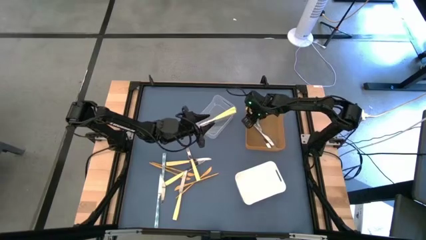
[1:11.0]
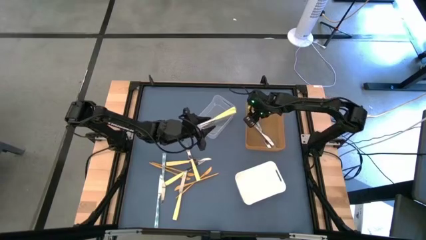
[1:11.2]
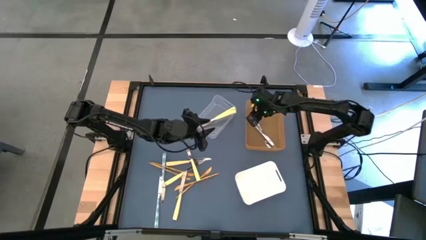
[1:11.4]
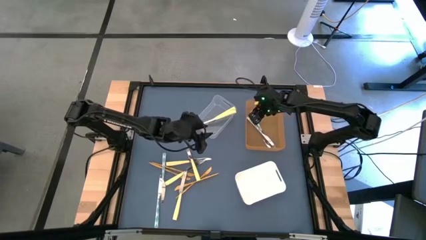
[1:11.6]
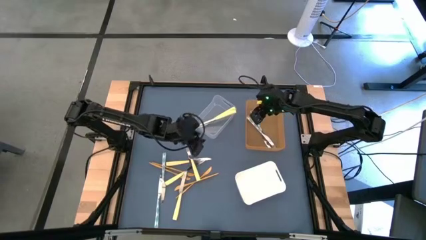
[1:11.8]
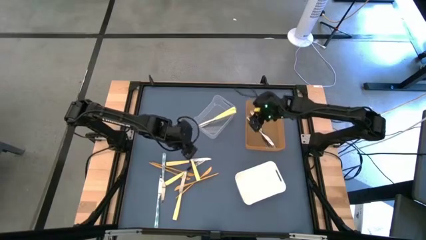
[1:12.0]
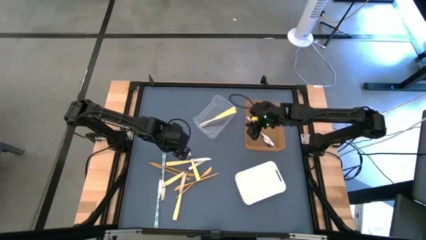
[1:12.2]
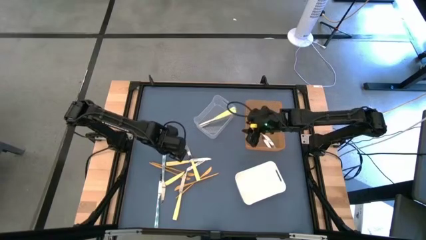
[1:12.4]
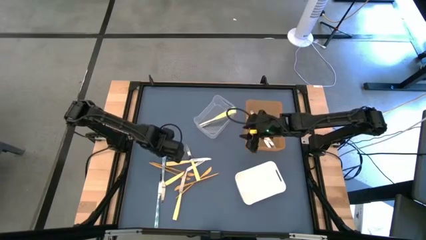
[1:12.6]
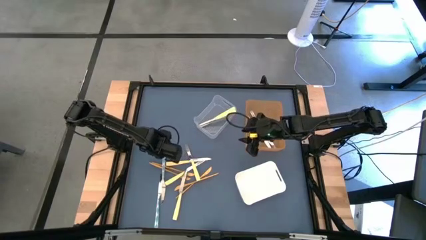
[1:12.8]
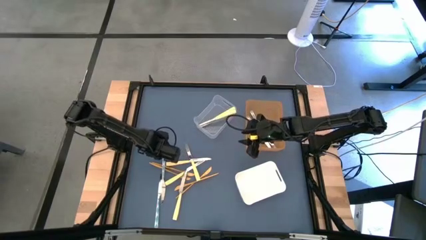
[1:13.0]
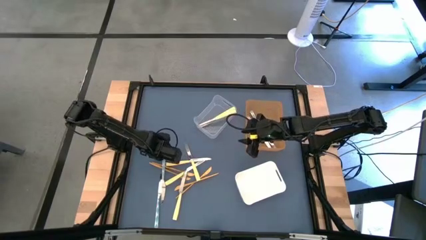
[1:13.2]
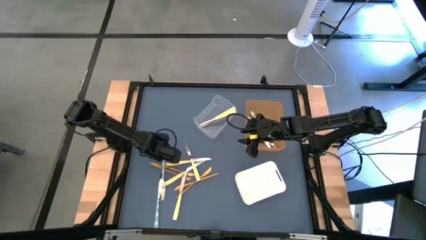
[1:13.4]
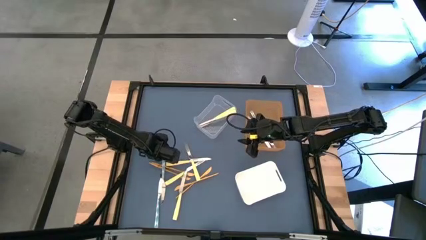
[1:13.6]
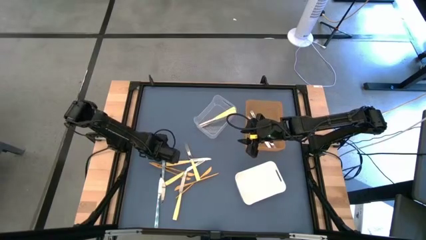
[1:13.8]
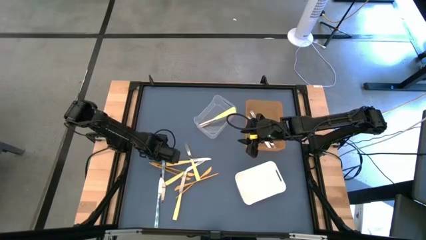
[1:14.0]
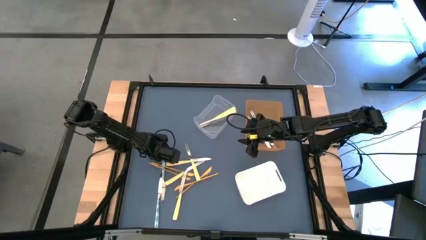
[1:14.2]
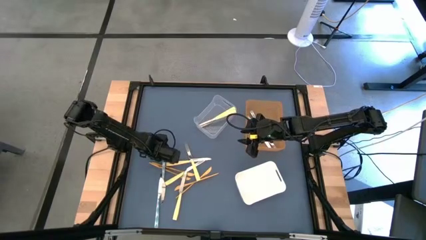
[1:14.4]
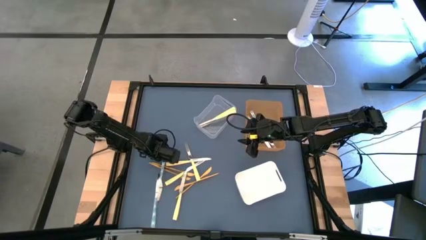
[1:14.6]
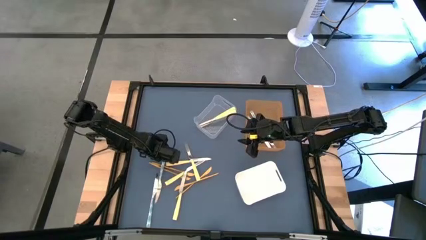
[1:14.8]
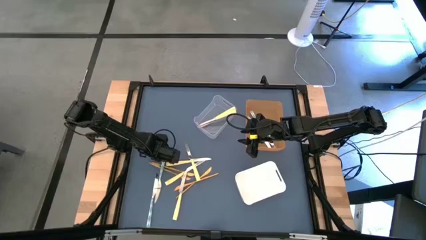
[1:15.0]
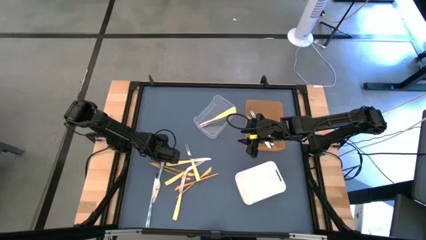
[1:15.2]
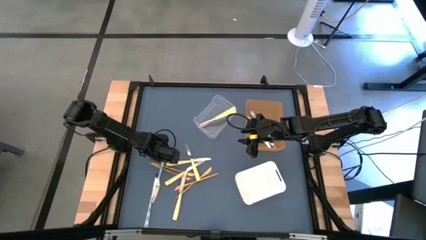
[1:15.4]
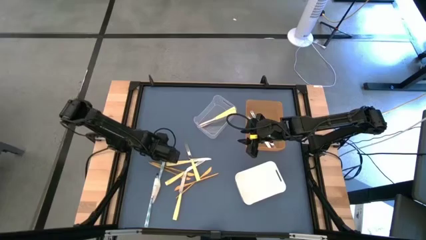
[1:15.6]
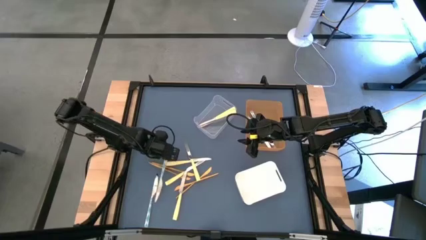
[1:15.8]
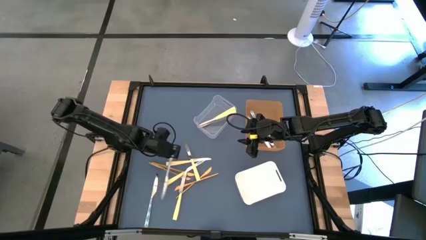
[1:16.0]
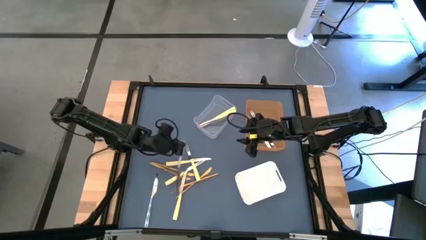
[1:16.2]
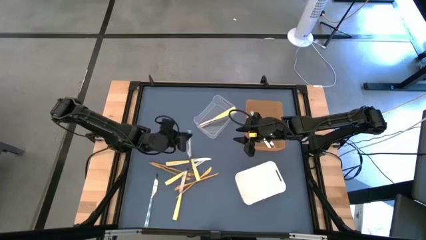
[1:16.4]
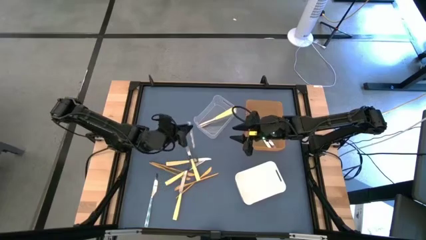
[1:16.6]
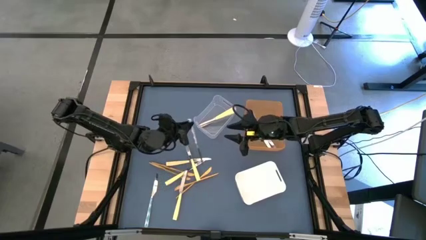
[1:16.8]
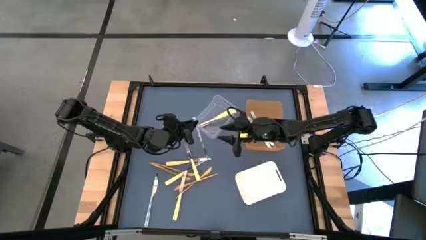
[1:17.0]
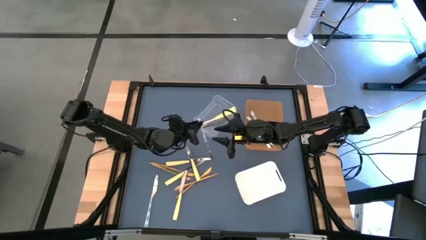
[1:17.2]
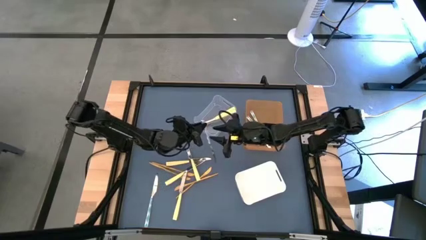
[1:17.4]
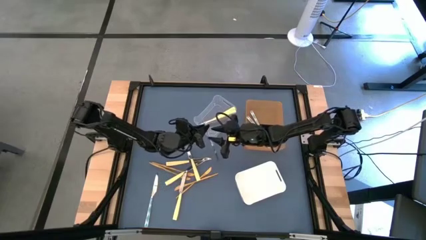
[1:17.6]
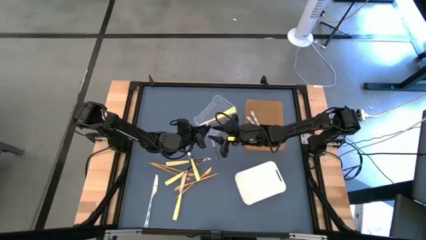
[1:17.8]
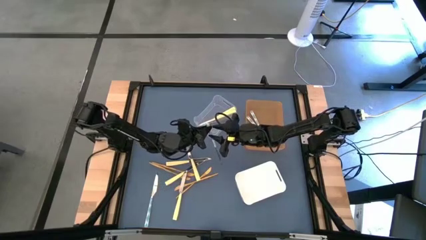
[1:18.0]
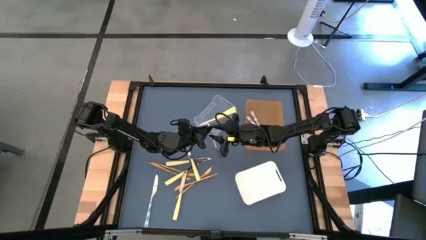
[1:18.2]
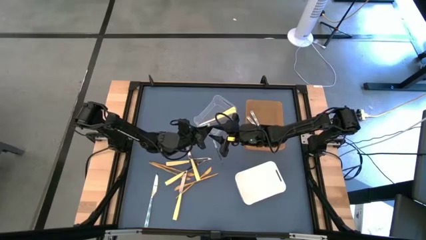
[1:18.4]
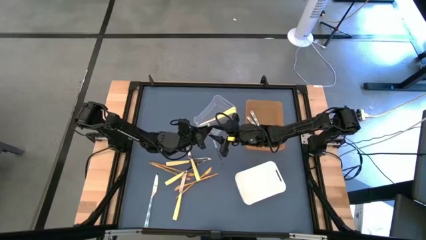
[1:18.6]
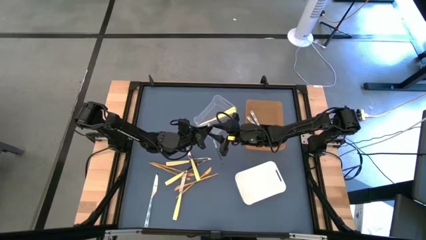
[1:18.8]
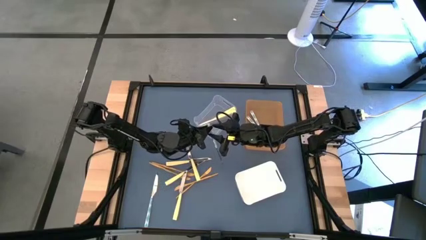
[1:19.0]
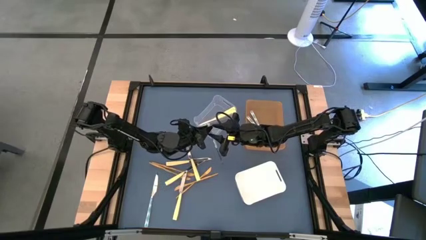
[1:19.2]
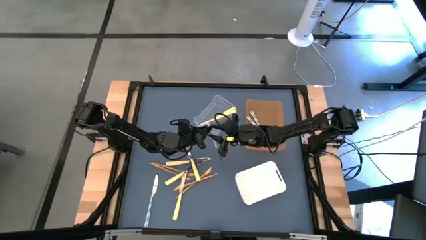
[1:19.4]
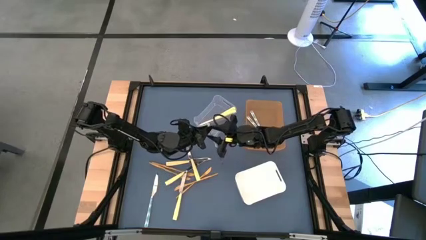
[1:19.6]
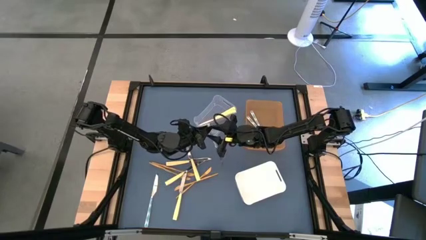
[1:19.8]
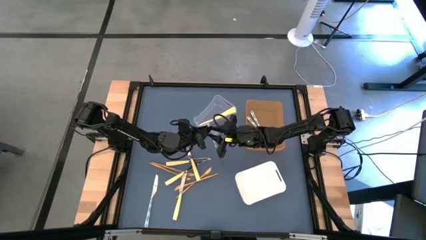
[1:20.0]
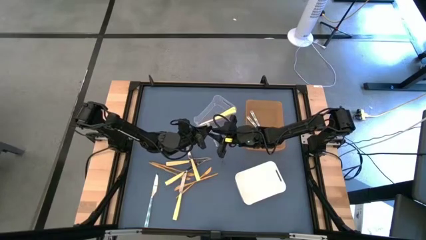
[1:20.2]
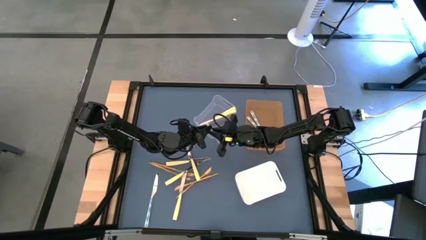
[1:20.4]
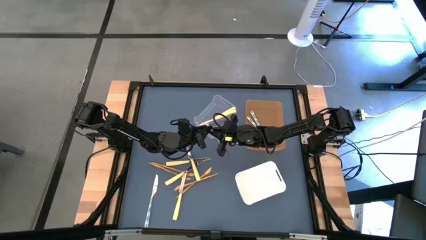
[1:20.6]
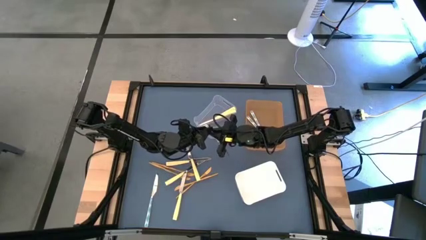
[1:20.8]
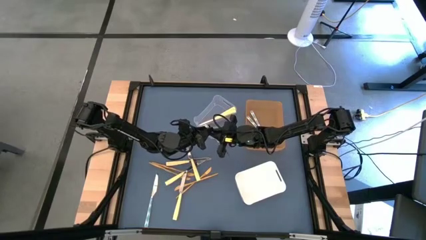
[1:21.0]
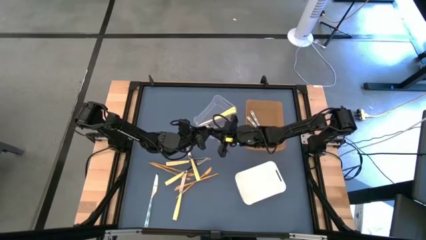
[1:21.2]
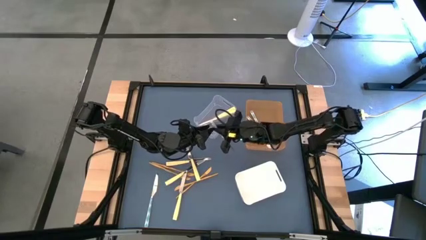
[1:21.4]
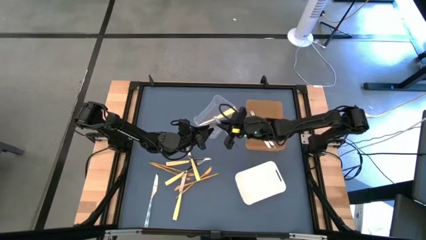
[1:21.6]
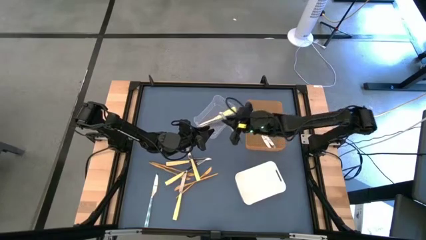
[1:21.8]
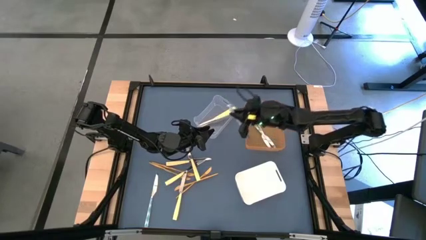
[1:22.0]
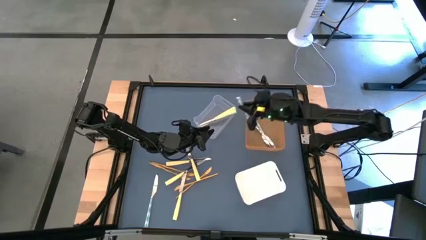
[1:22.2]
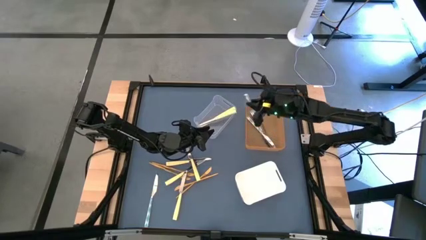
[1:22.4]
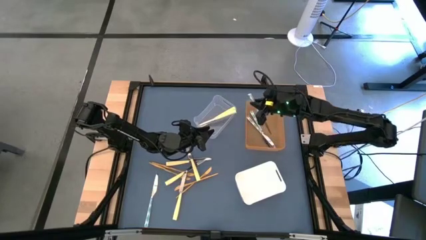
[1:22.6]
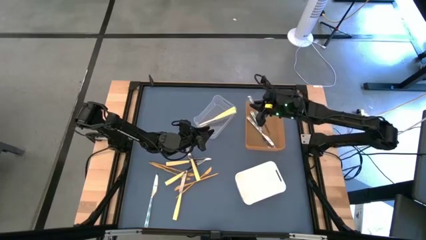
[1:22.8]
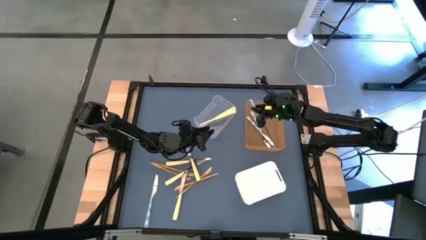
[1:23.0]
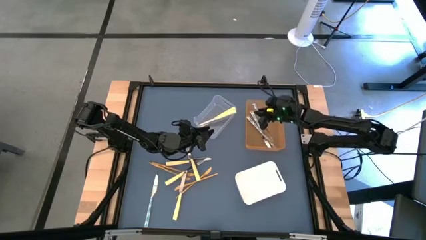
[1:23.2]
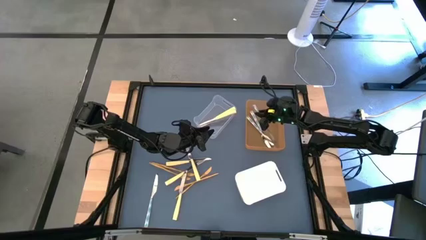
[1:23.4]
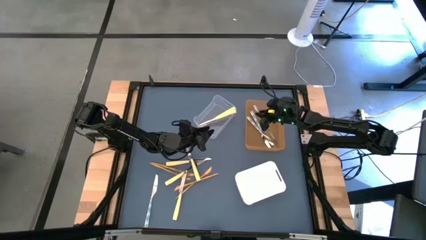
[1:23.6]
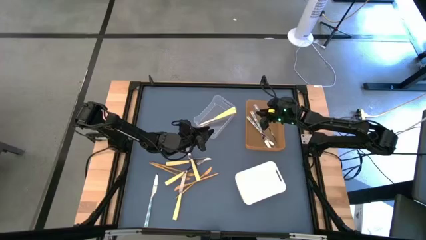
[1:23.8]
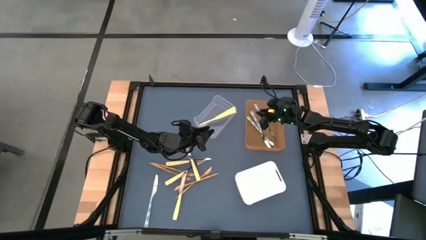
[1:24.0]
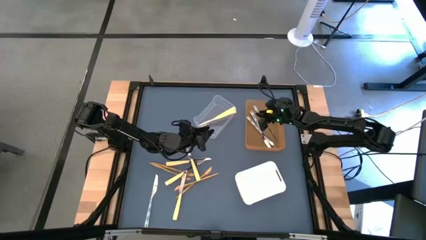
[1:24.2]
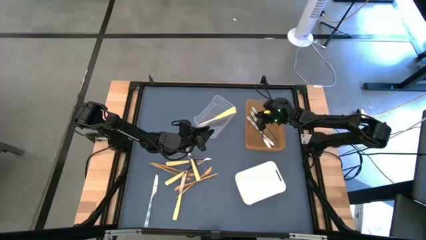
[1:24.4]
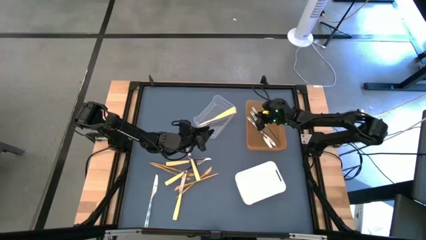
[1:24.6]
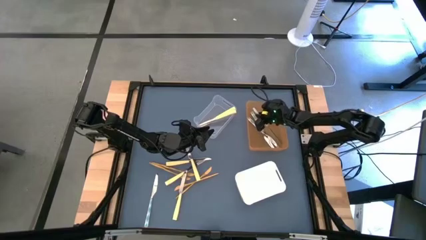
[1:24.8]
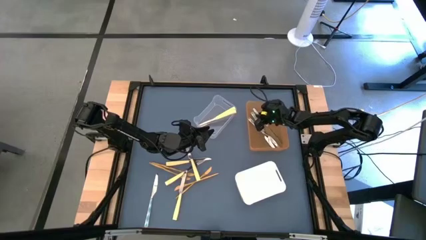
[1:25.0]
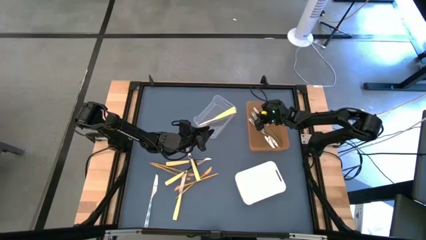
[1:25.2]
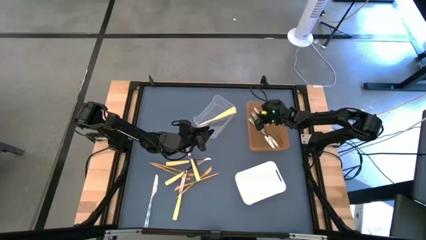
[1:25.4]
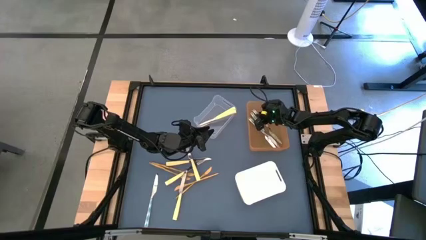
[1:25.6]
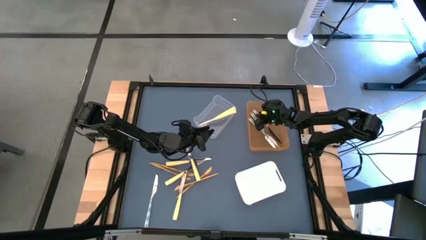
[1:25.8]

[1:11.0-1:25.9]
Task: Sort silverware by color (type)
Put the white knife into the orange bin
